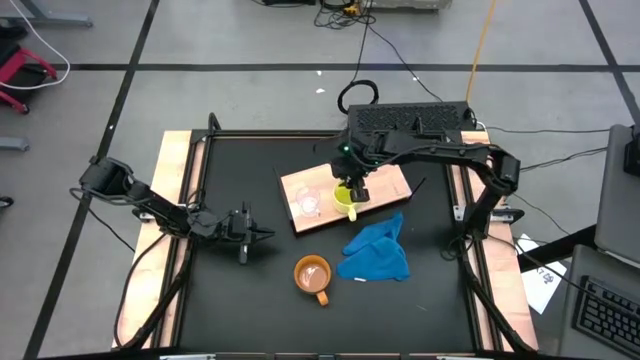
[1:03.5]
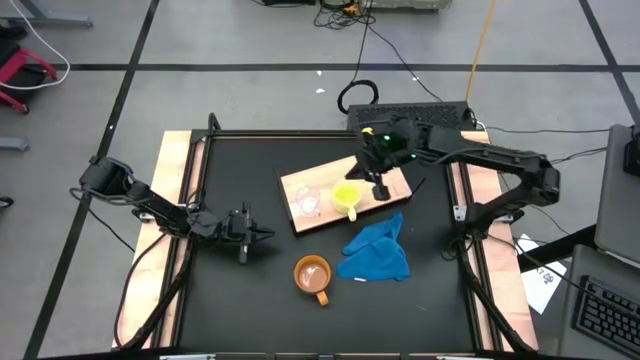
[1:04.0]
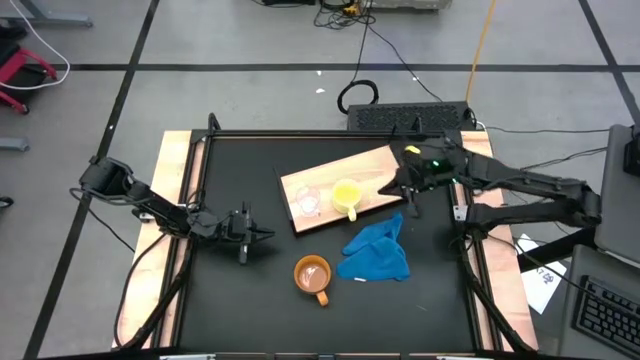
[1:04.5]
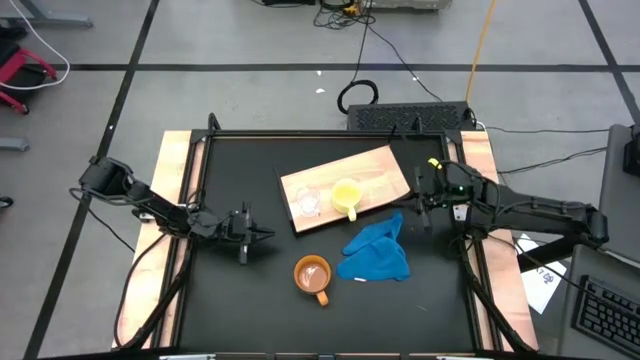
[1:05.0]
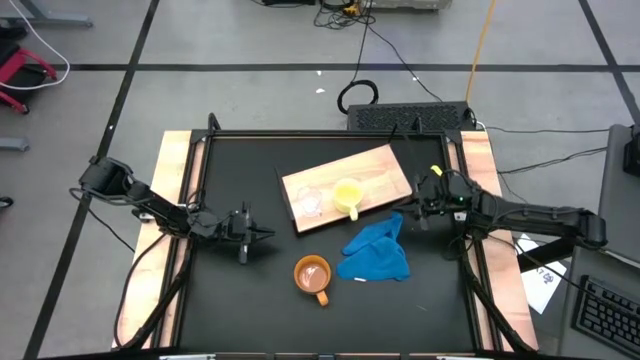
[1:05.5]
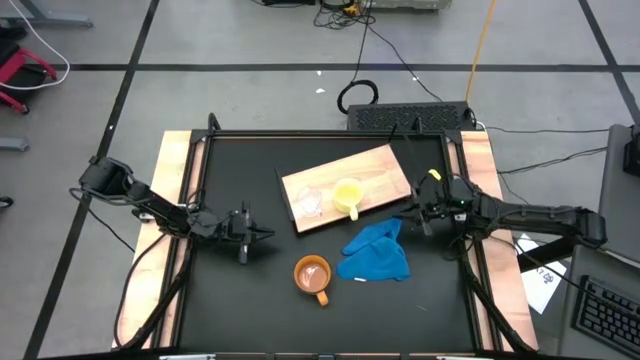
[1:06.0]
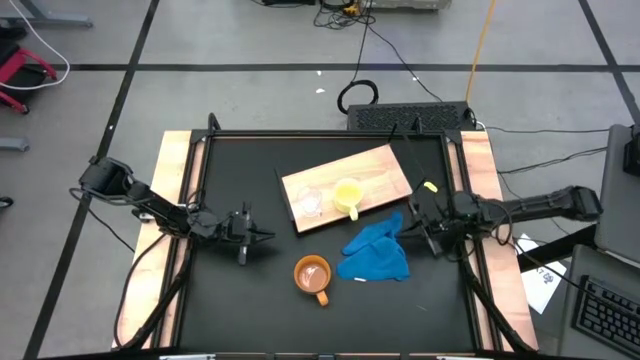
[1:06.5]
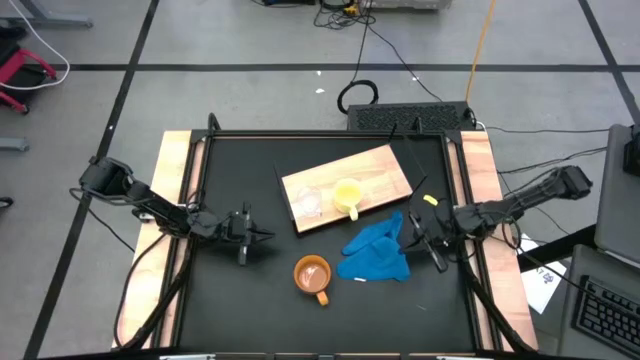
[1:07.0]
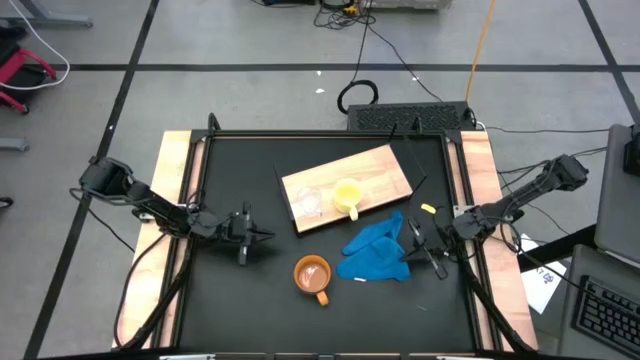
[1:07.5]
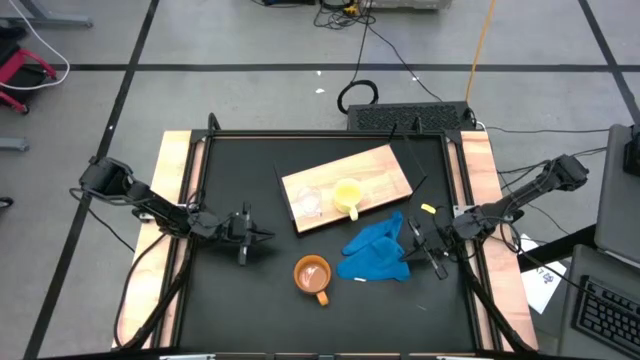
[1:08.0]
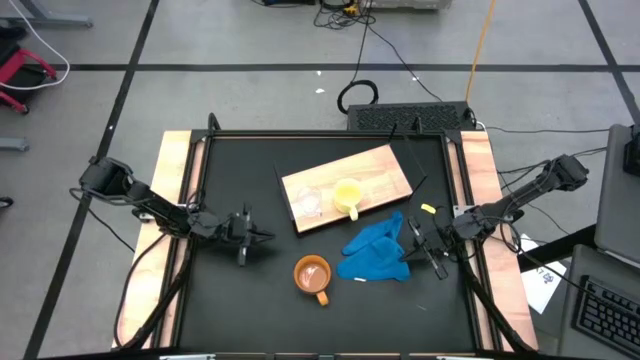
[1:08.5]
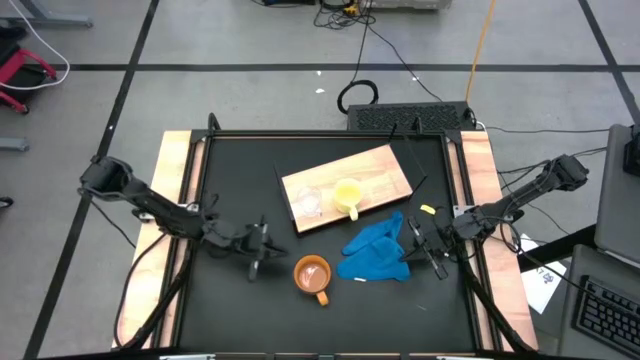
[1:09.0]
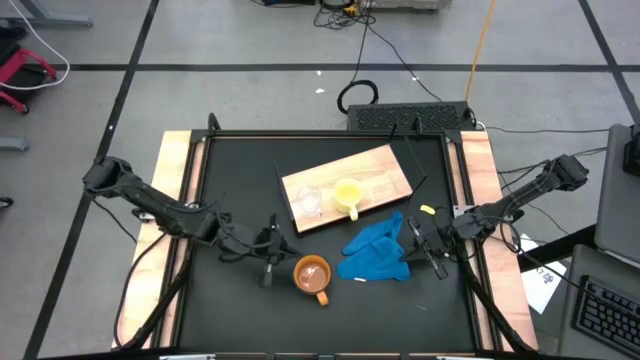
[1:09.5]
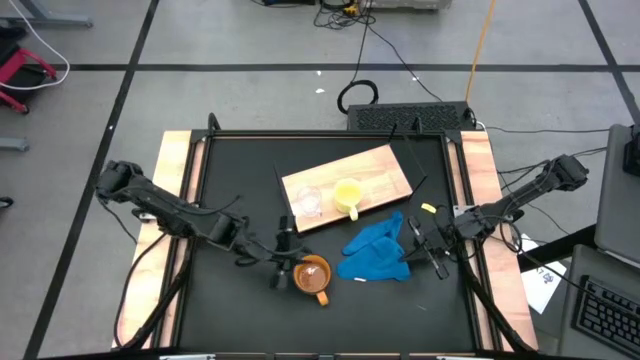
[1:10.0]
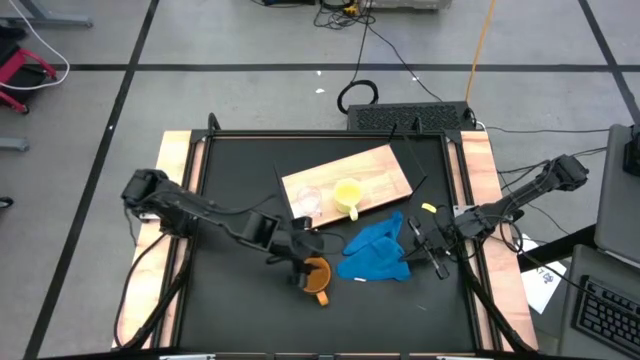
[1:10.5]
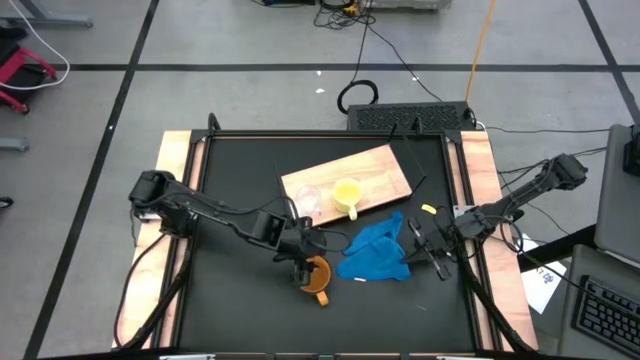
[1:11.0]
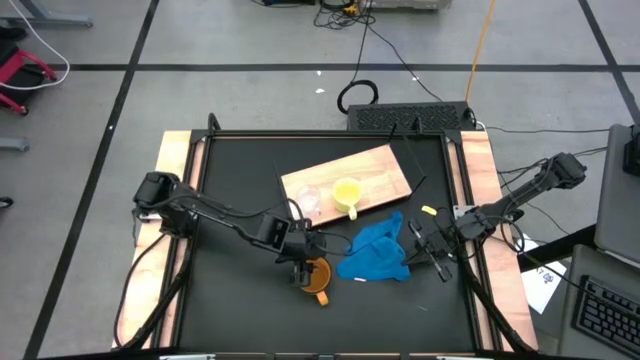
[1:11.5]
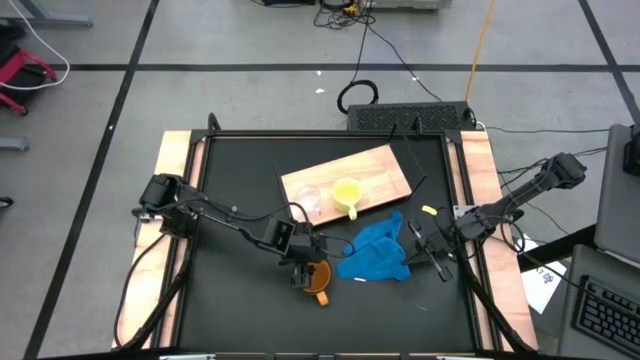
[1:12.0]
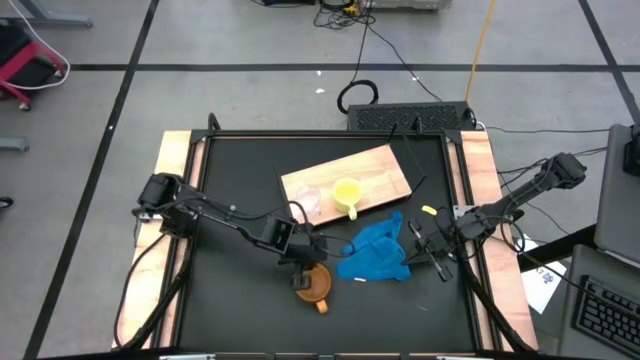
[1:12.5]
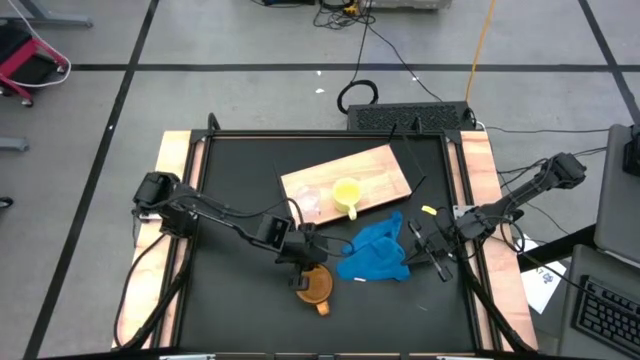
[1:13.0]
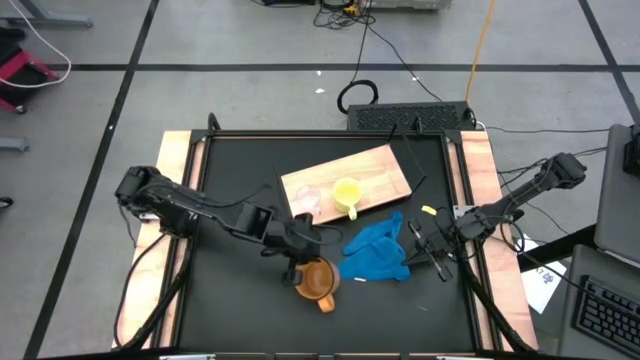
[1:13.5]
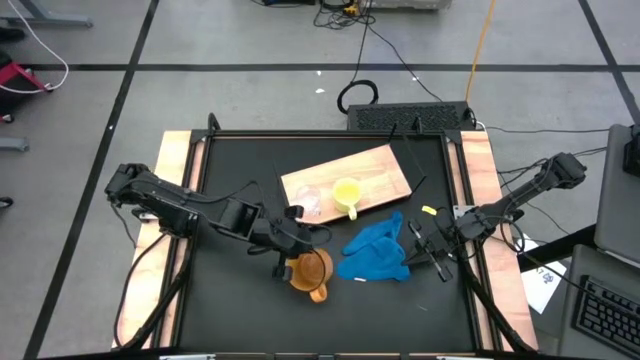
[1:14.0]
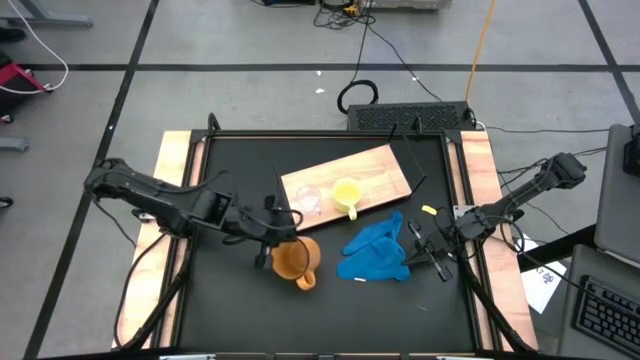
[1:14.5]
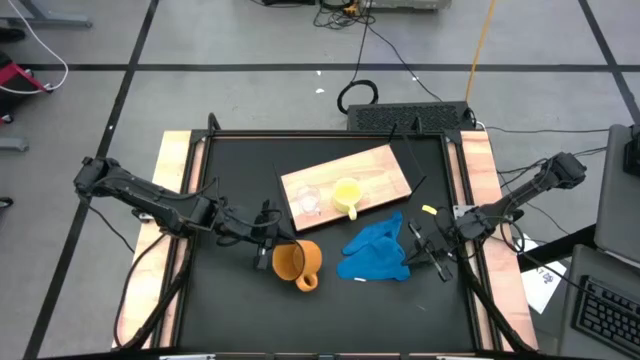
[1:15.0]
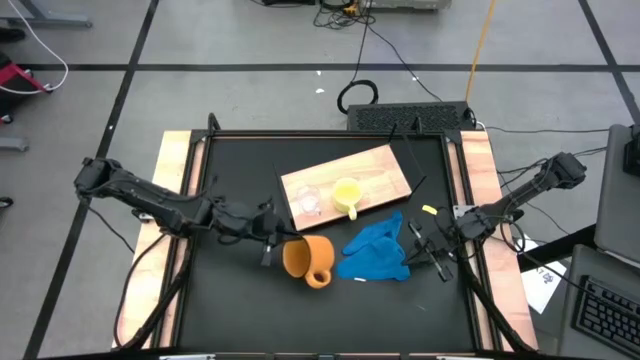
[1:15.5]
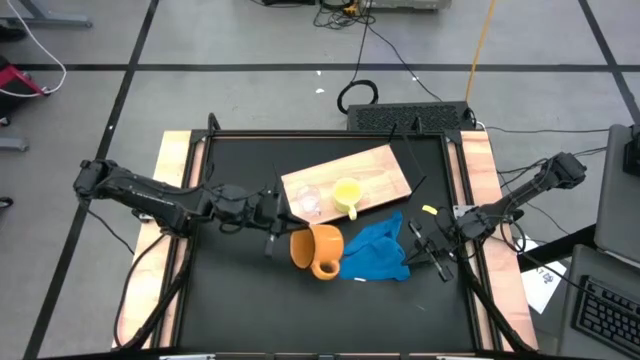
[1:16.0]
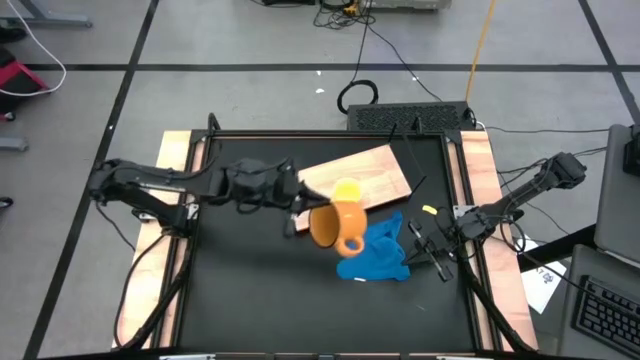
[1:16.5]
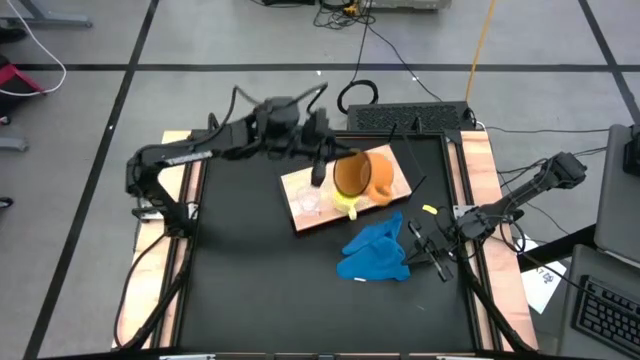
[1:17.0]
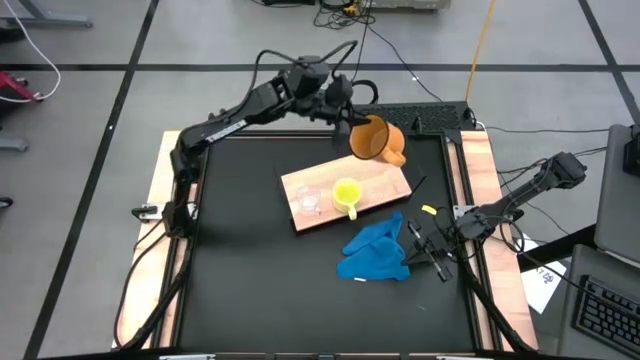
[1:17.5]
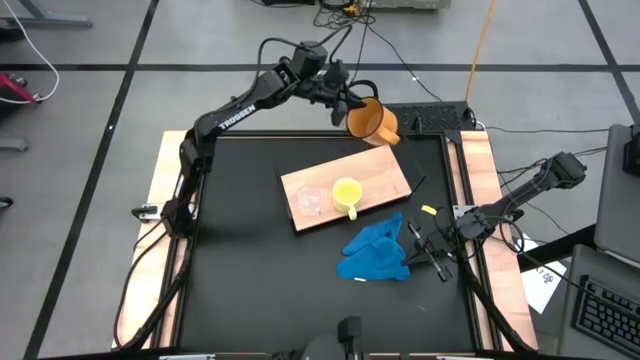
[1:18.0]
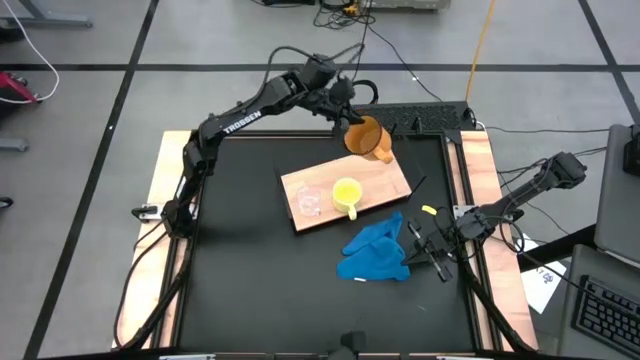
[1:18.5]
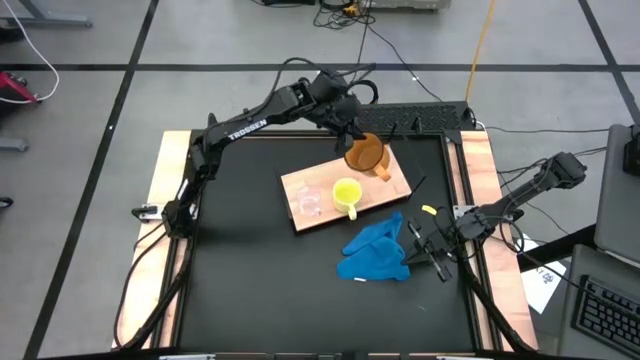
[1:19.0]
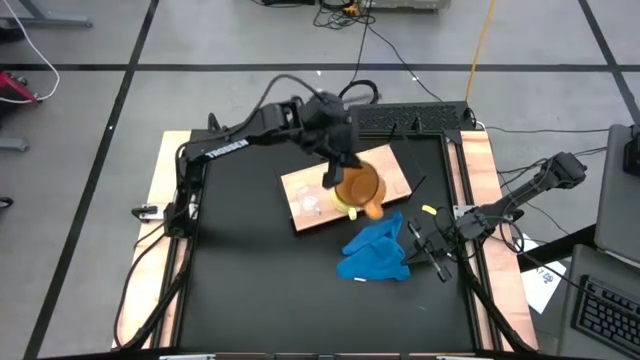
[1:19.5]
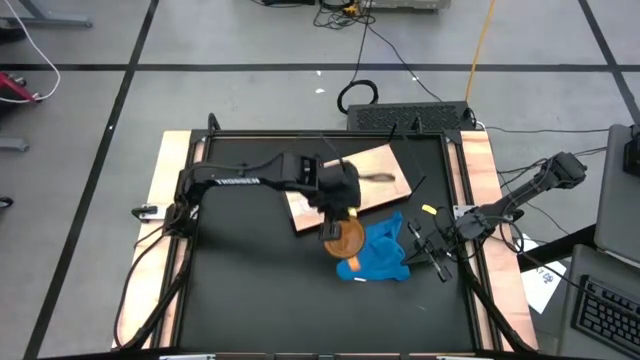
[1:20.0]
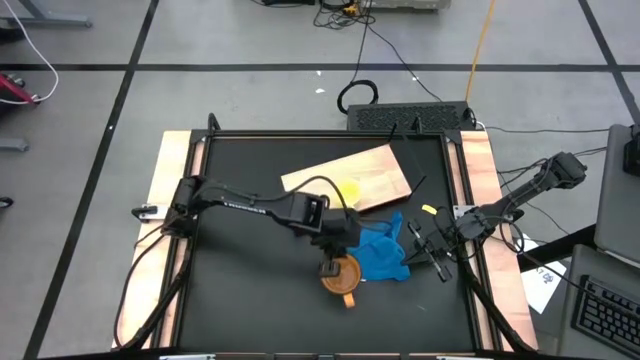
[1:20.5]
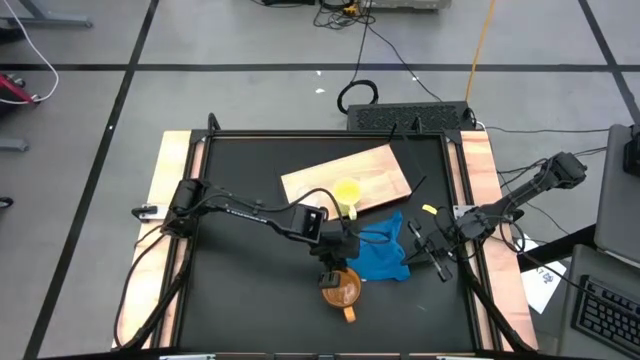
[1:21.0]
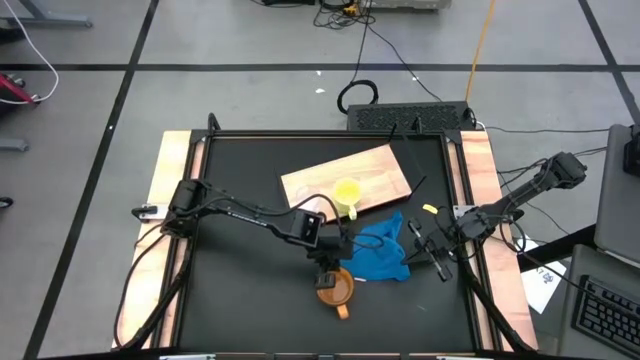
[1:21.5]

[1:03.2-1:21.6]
Task: Stack small to large cups/mugs on shelf
Put the orange mug on the shelf
